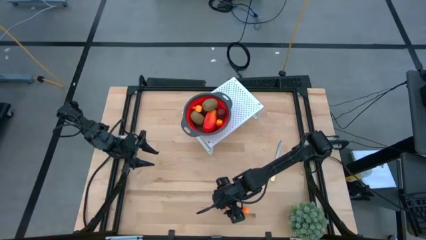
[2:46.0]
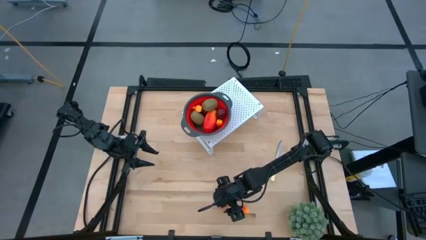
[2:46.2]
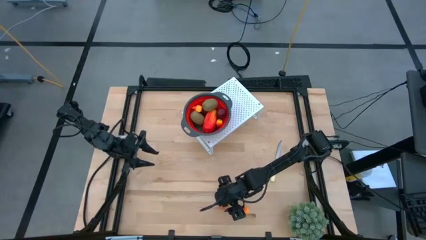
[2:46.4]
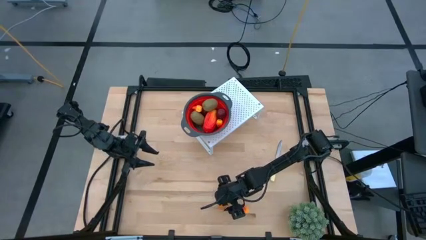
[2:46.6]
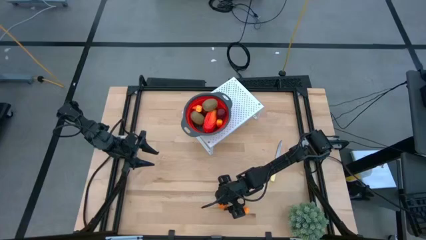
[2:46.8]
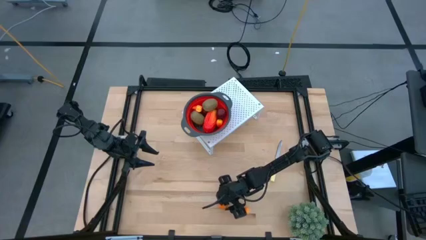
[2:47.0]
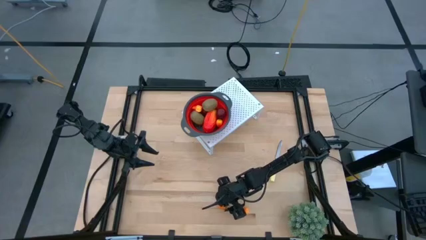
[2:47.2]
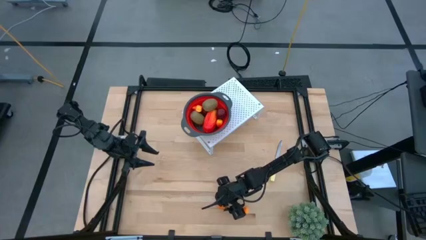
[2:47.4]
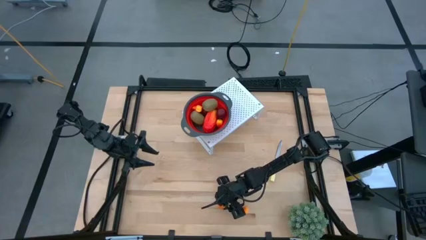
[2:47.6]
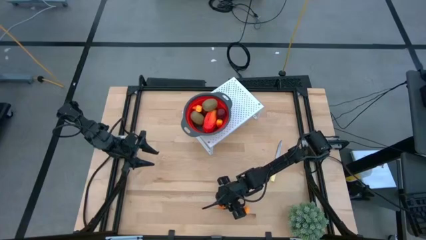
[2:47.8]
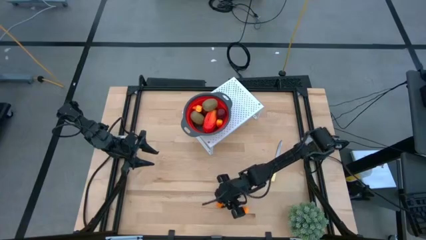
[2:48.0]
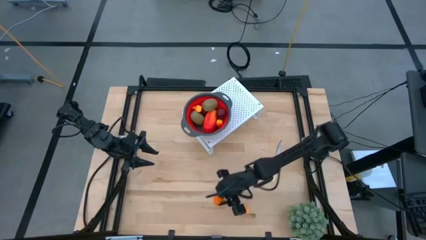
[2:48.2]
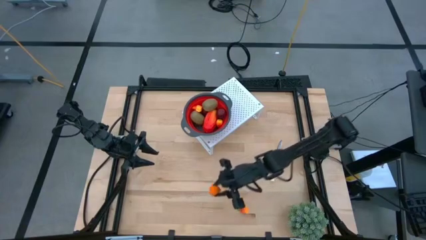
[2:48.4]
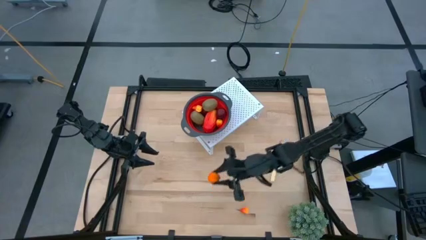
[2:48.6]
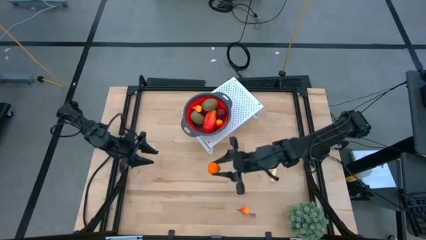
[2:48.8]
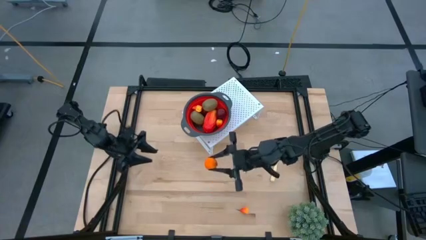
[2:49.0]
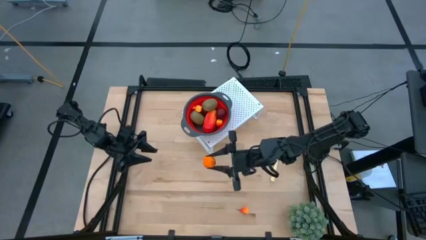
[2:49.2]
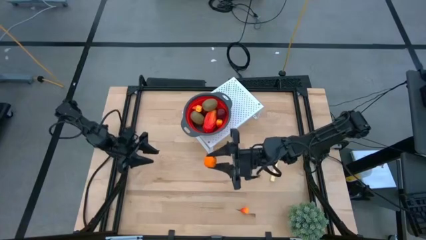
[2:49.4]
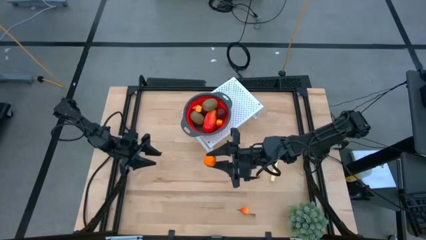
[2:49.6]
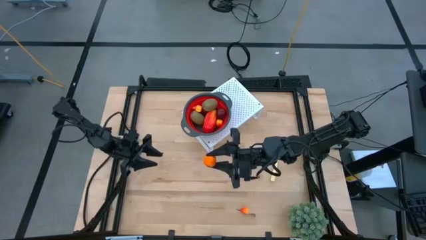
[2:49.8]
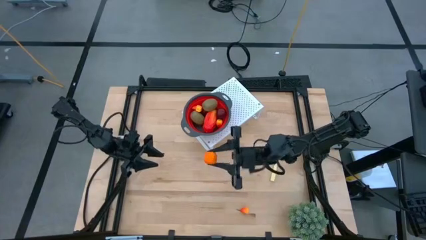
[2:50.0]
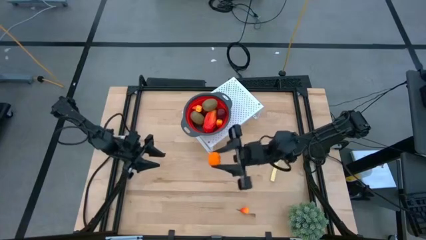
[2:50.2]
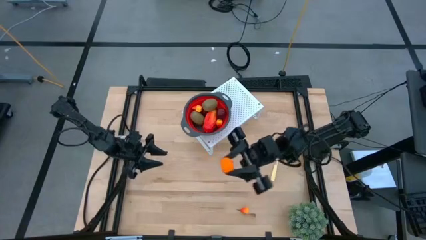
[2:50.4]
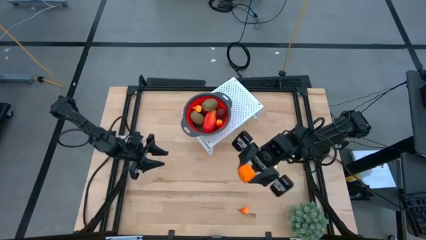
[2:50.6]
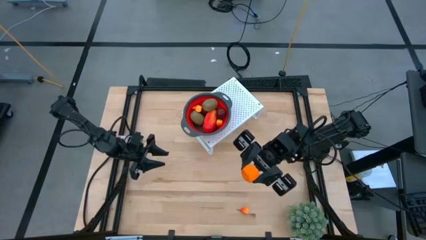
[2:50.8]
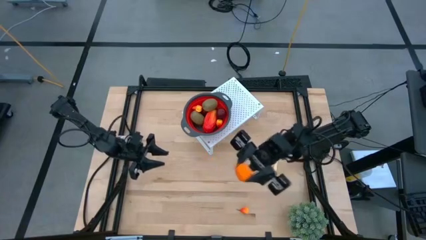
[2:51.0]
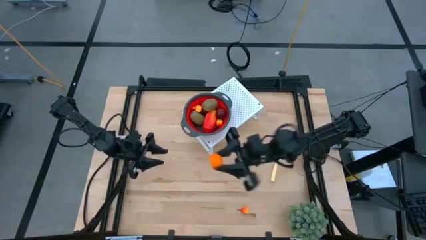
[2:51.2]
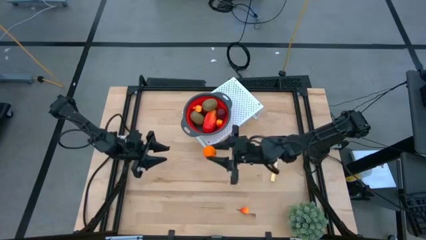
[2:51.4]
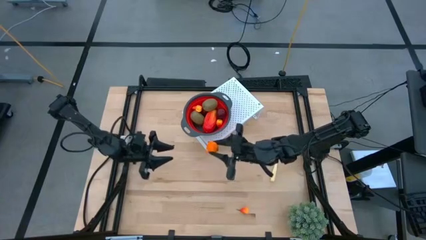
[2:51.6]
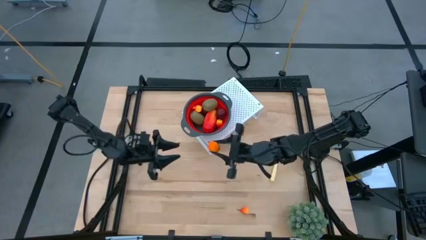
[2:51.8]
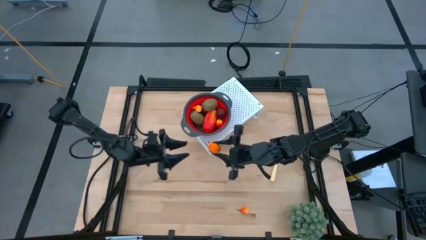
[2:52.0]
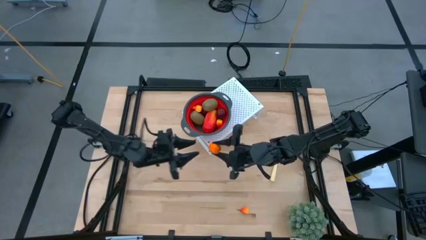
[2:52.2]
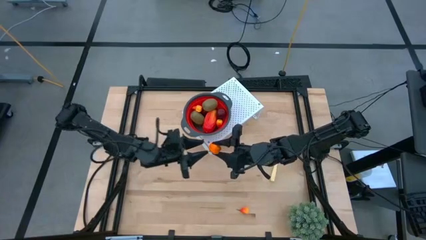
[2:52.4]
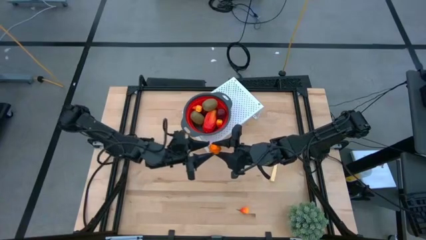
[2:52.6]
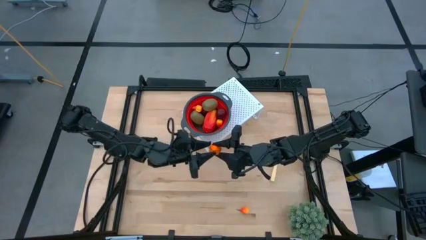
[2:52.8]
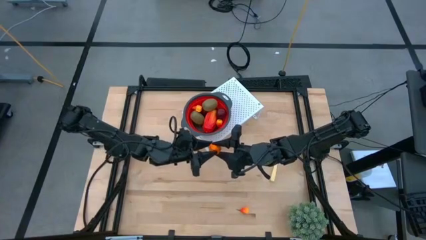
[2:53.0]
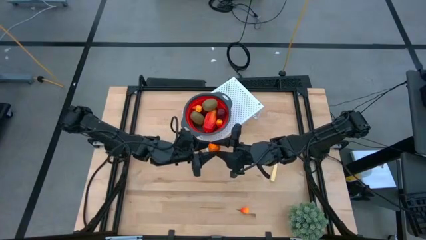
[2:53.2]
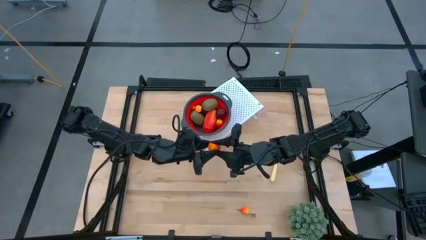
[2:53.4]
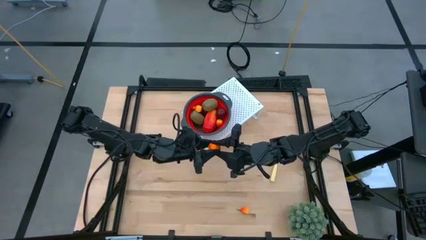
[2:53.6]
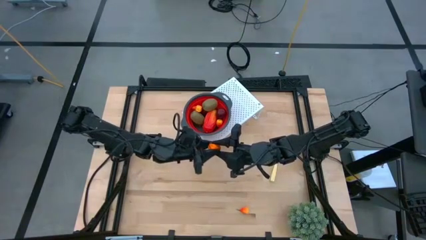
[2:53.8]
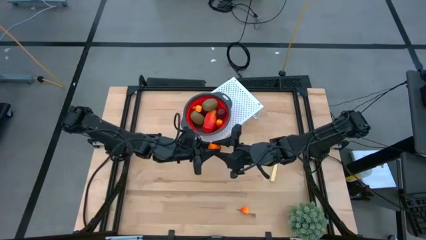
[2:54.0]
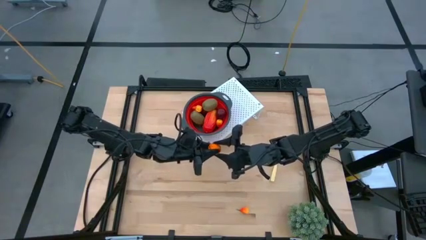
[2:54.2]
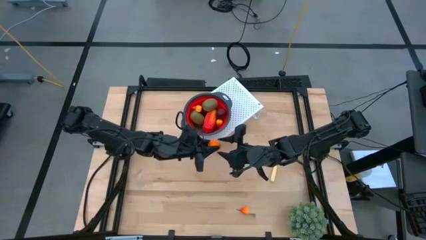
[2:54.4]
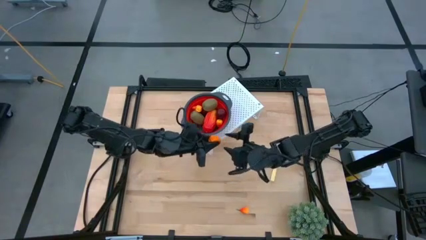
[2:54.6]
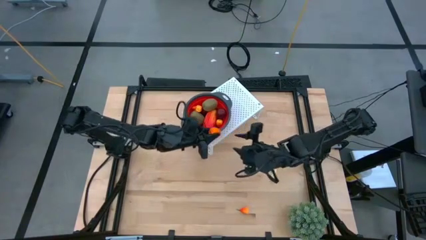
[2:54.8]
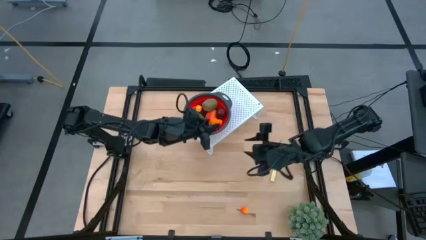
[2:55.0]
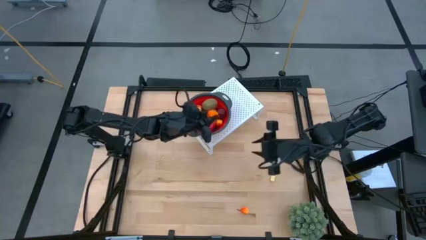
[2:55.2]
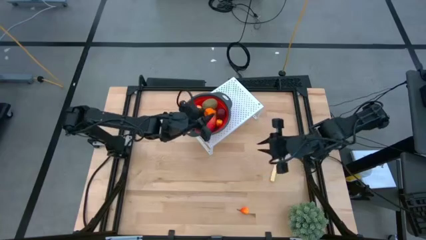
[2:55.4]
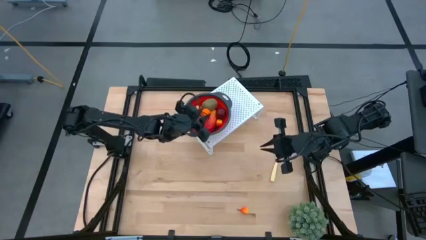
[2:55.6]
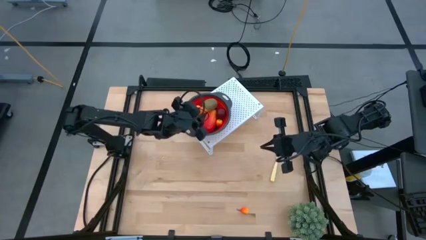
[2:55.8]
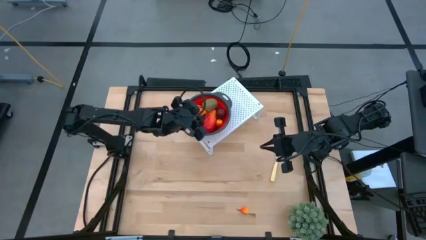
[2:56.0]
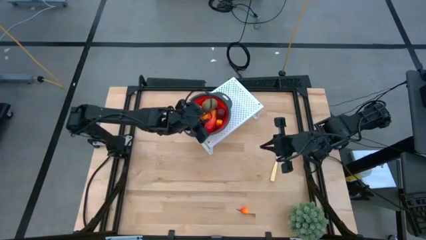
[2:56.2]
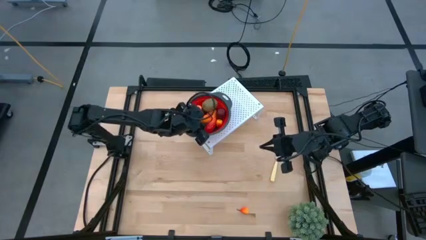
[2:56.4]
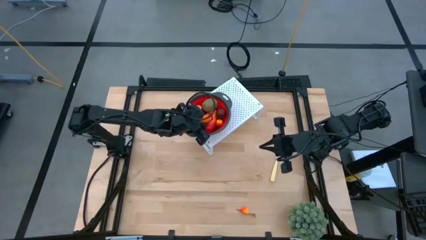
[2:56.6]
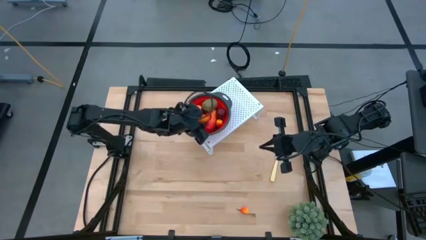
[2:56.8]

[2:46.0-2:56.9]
Task: Pick & Place Fruit
Put the orange into the red strainer bowl on the shelf

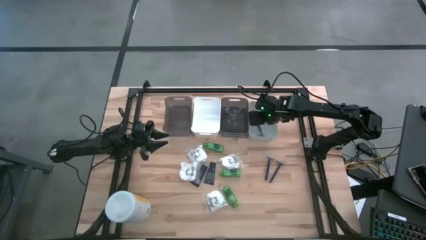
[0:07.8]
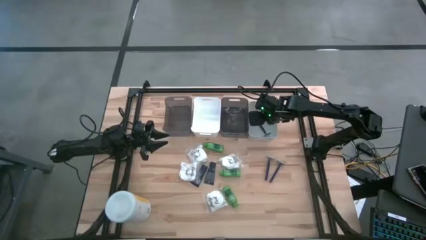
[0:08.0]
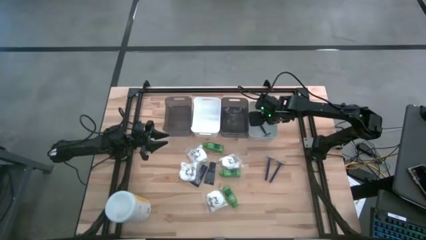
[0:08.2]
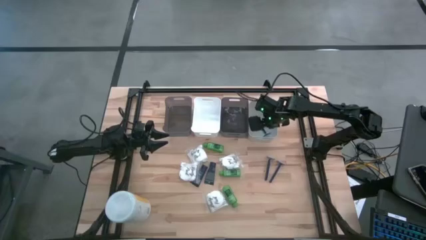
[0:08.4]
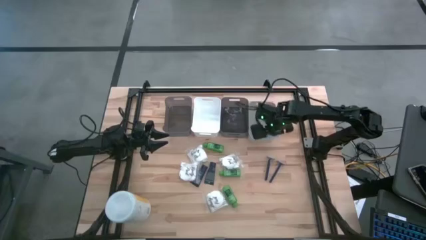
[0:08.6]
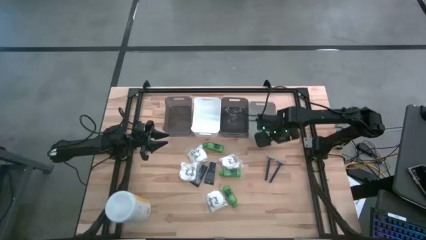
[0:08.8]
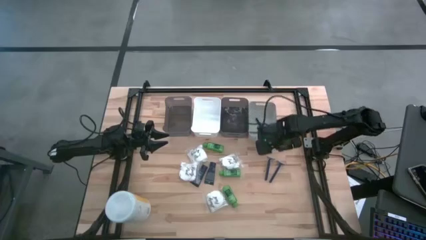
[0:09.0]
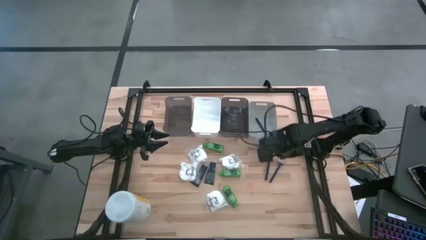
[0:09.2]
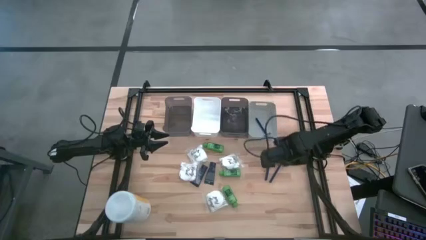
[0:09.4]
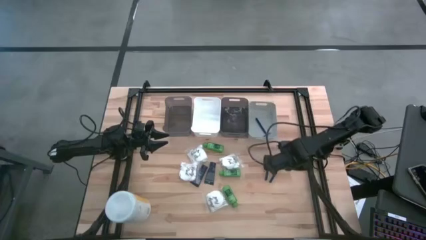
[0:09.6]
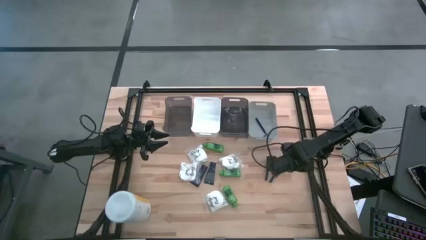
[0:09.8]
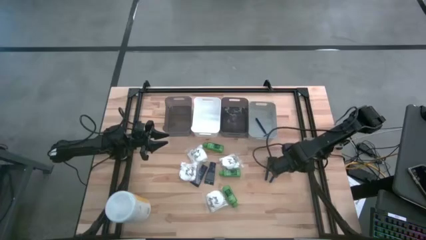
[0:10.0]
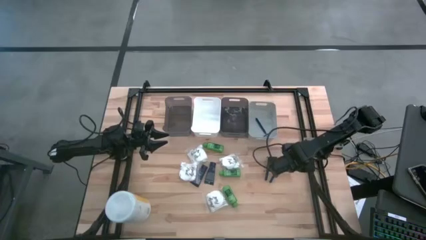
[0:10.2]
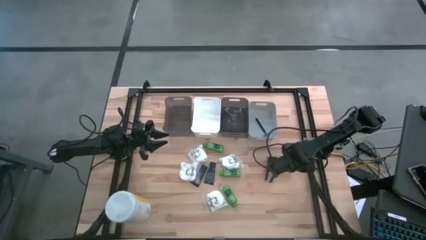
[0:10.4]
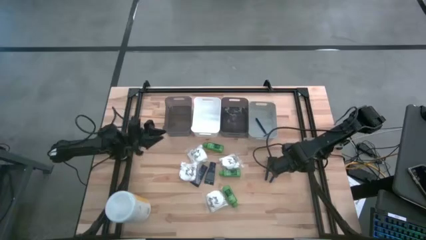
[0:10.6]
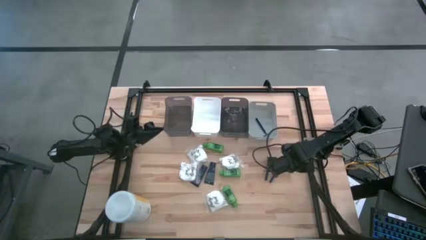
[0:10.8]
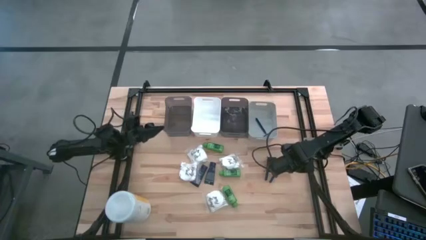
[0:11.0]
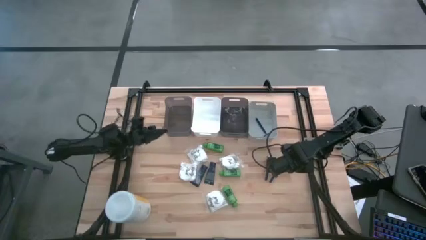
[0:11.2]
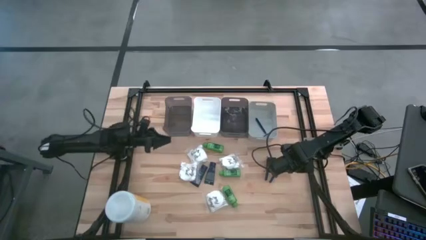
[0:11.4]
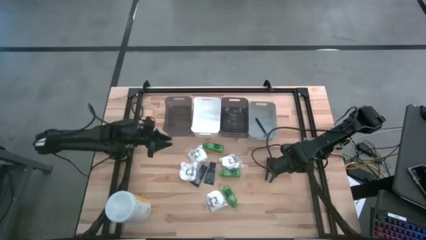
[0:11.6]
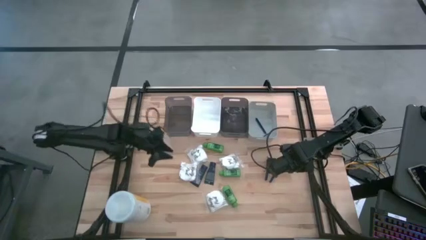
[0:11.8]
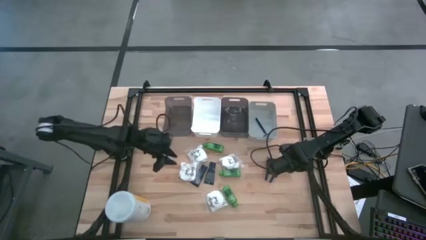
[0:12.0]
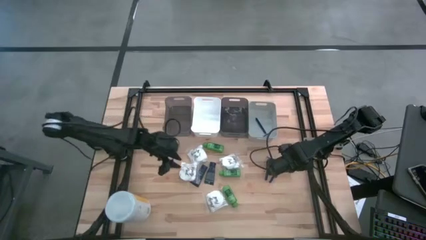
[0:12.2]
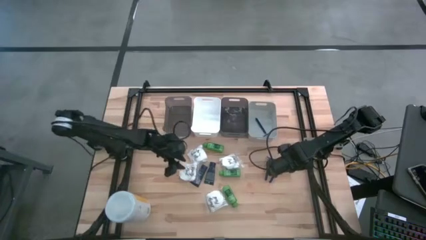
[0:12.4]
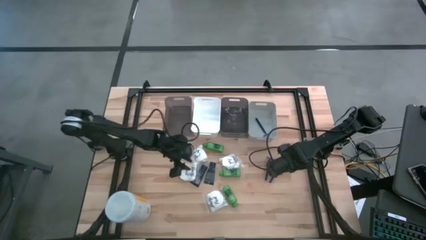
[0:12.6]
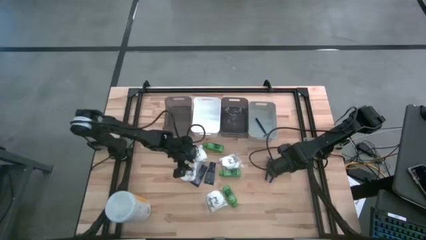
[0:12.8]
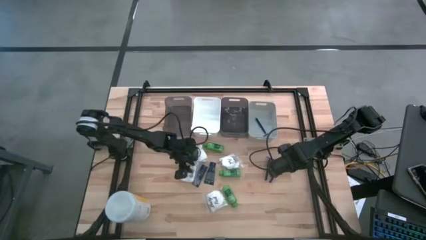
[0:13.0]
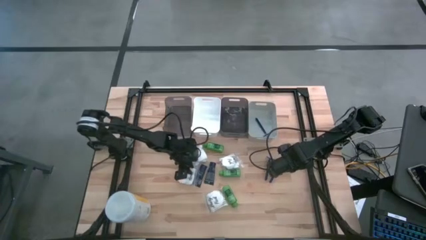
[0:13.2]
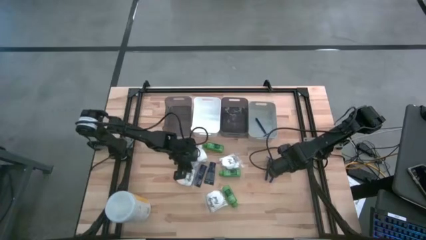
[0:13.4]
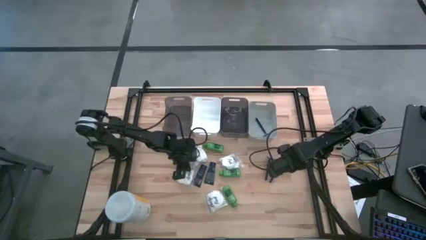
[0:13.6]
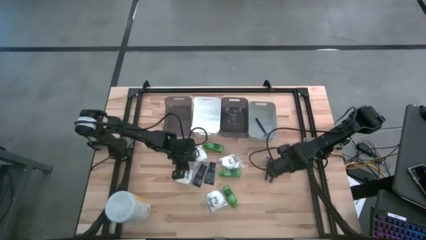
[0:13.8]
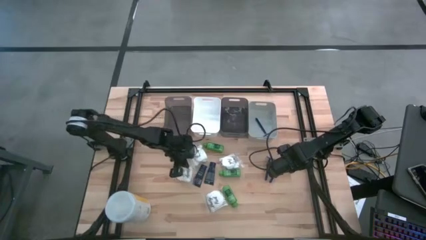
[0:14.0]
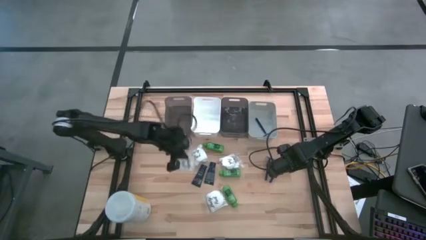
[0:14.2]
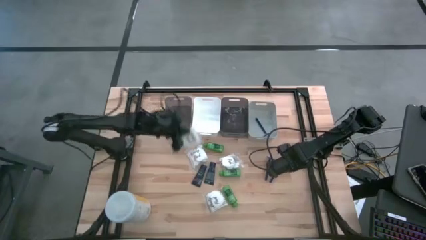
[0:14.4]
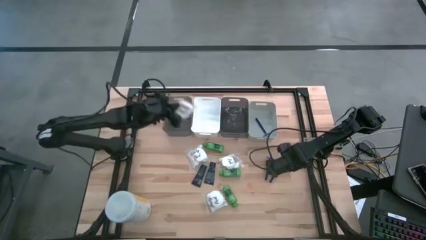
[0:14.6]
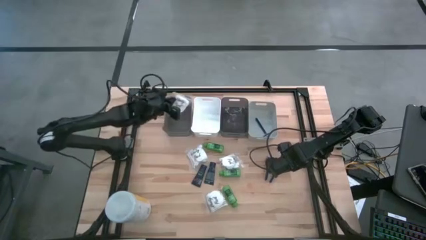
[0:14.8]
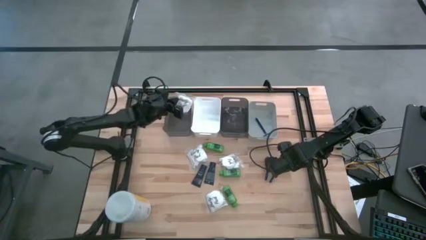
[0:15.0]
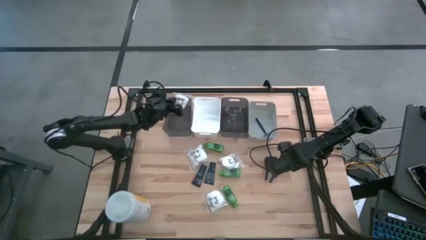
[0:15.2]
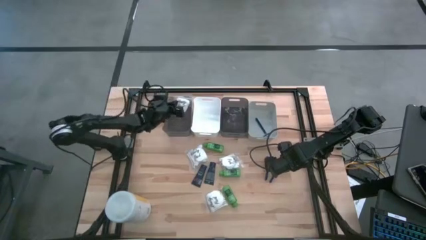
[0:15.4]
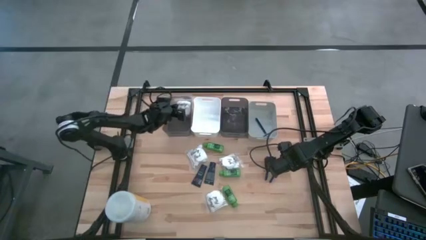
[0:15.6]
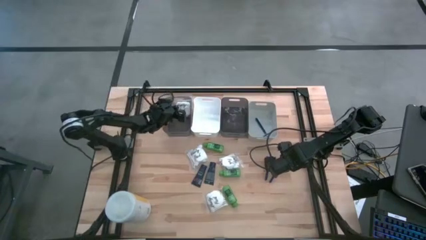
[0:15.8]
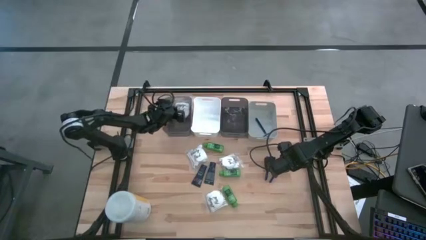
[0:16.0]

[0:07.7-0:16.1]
Task: Pick & Place Travel size toiletries
Put the middle left cotton pack into the left black bin
